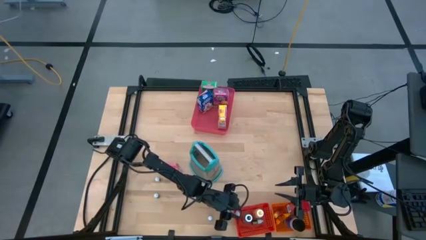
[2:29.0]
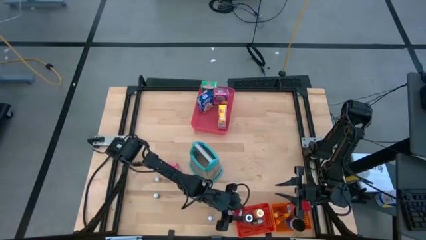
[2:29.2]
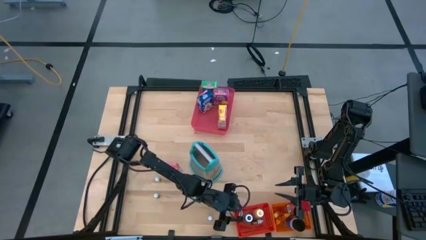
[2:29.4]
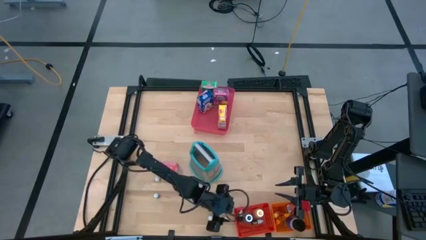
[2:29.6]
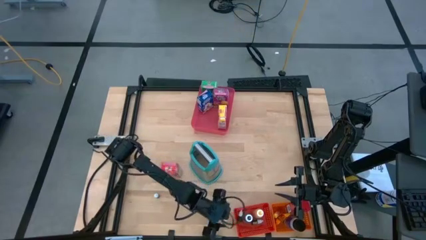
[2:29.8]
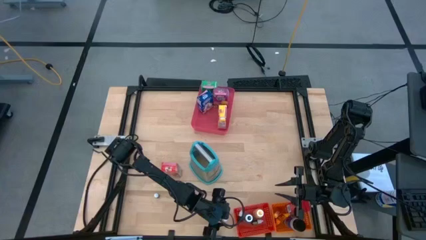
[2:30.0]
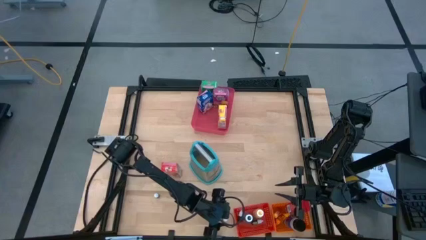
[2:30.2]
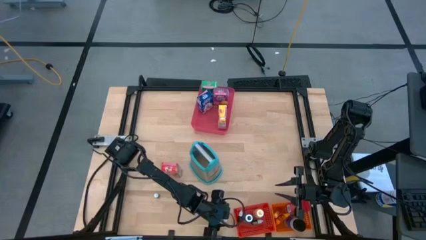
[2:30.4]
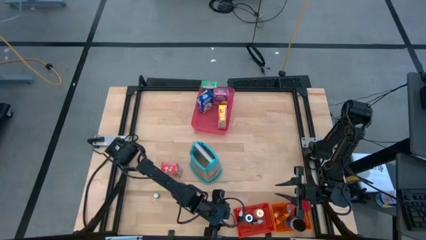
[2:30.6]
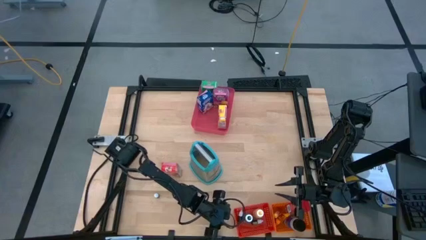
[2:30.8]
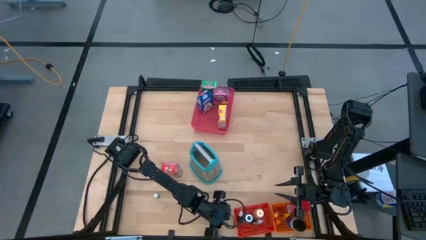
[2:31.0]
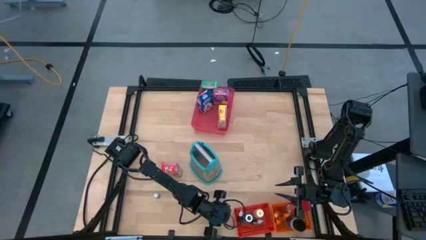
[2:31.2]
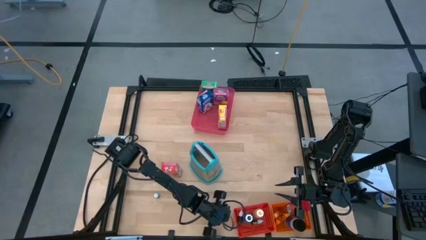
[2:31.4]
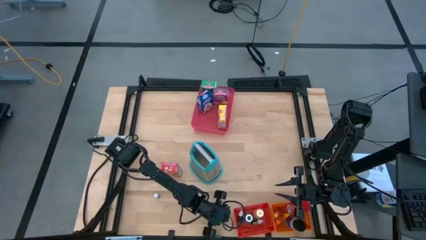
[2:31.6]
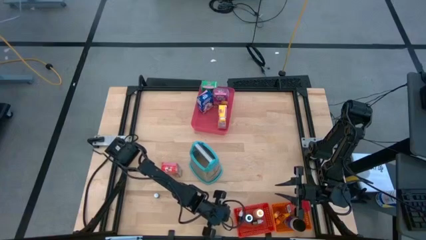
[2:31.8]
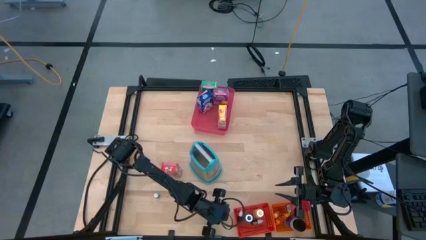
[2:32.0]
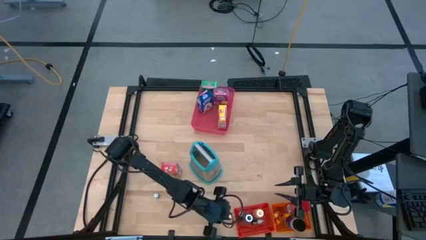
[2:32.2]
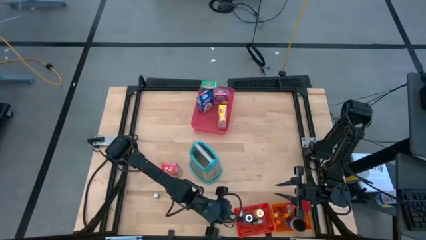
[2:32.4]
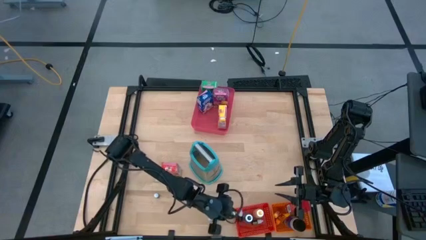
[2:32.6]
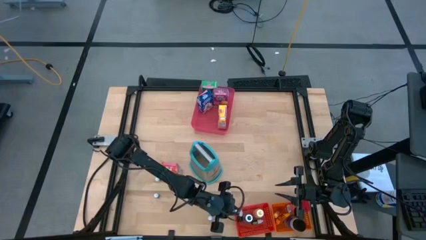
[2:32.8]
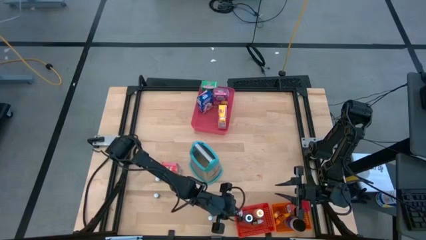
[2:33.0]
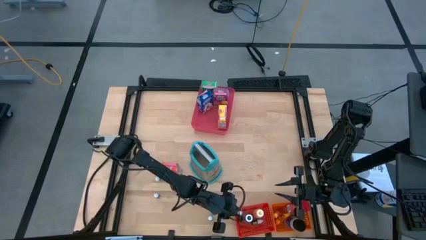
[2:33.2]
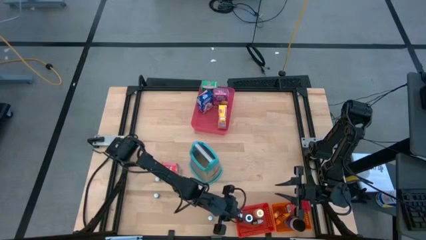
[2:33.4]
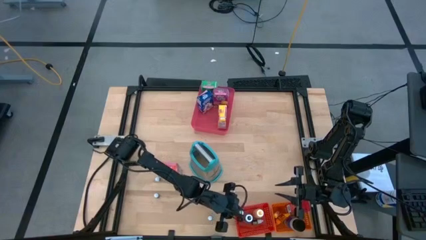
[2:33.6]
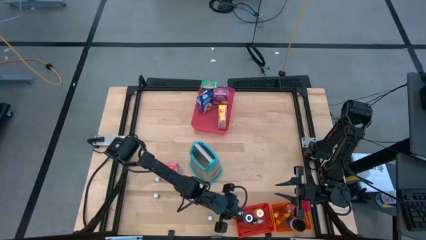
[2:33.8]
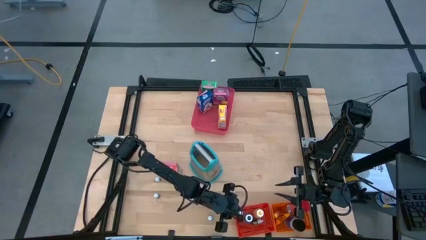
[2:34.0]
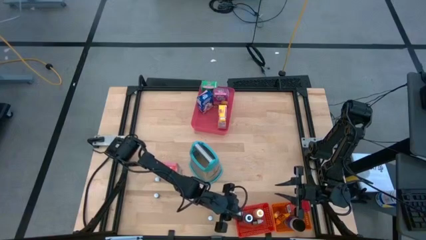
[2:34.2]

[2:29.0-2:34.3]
Task: Pick & Place Kitchen Items
Put the red food coloring bottle into the red bin

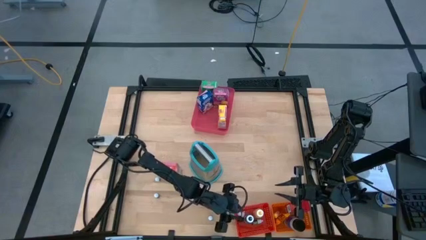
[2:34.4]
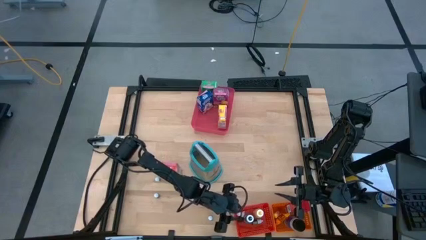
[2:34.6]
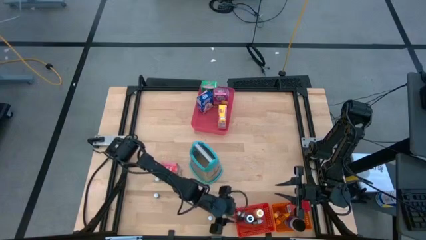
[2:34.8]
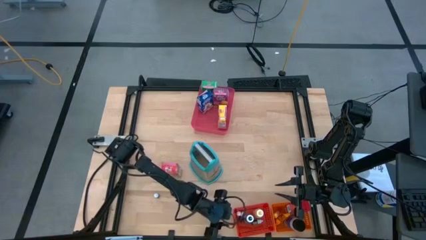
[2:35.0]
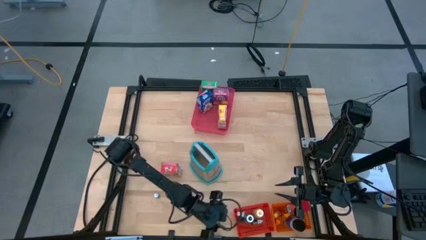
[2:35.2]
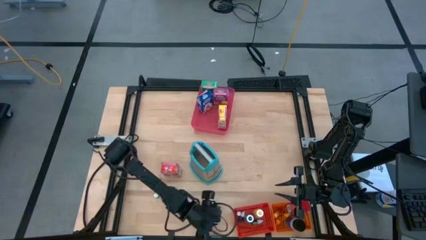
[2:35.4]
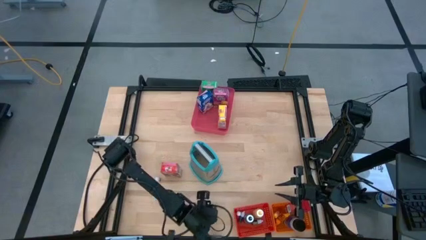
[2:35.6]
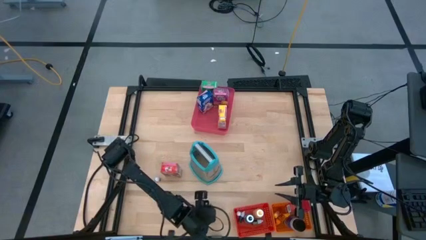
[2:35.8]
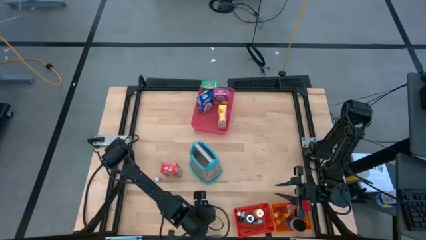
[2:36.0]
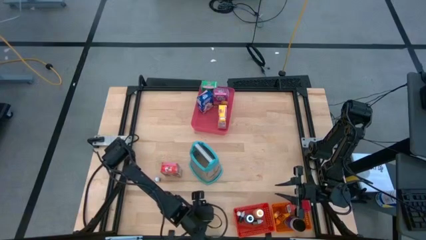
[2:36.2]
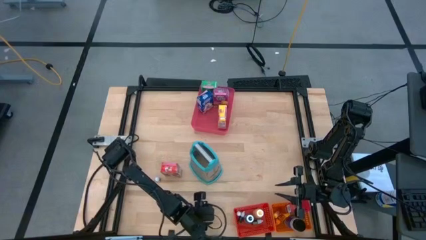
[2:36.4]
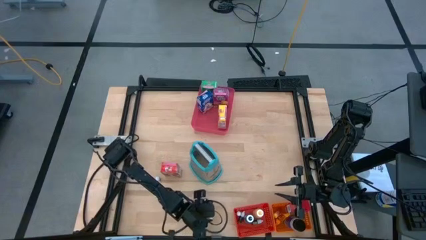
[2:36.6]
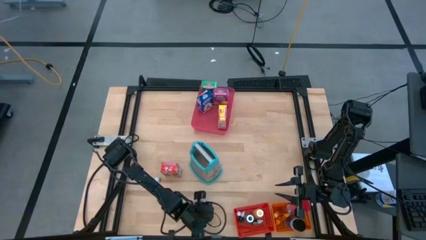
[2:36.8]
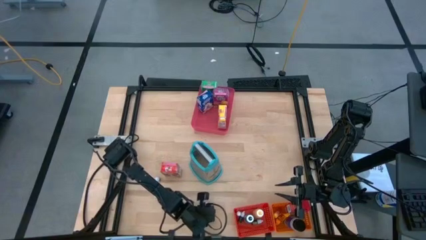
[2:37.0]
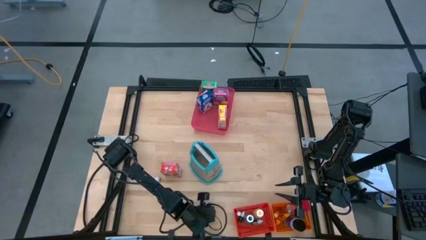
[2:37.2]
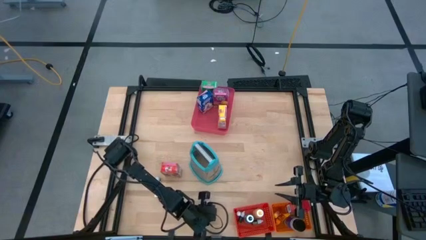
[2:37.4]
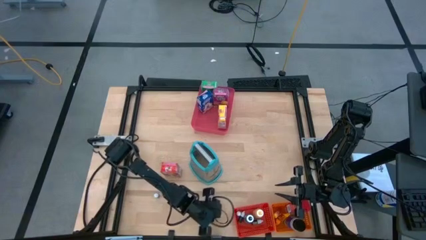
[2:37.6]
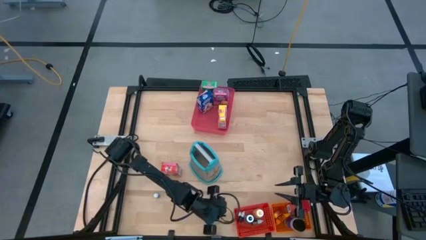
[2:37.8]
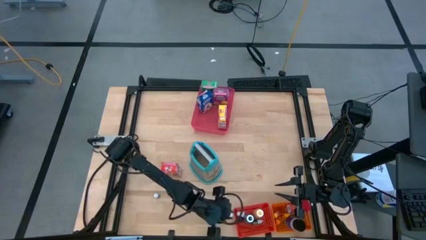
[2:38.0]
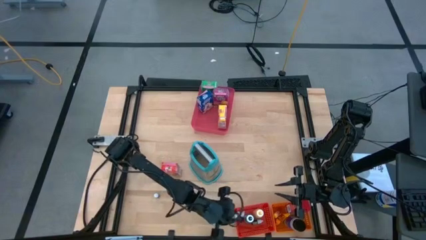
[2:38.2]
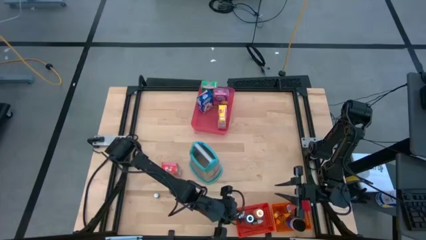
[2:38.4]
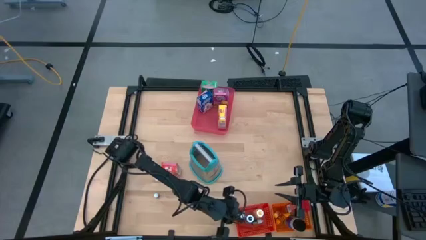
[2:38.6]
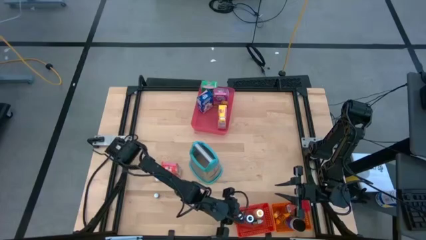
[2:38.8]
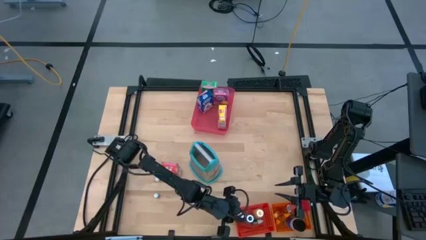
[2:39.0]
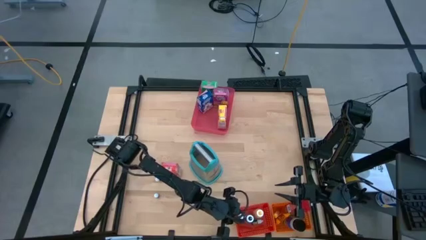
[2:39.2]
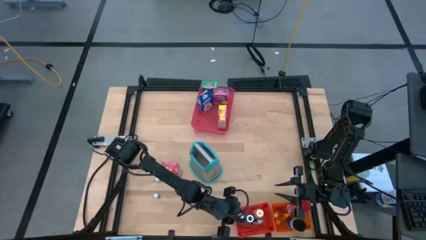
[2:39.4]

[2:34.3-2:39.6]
Put the violet food coloring bottle into the red bin

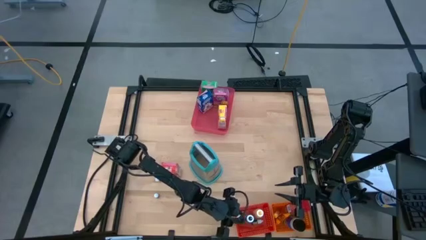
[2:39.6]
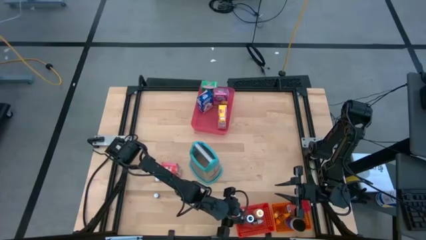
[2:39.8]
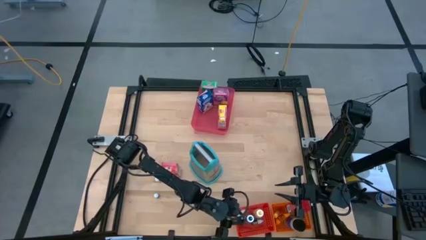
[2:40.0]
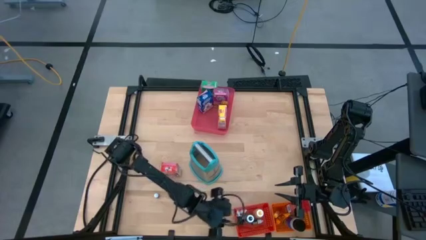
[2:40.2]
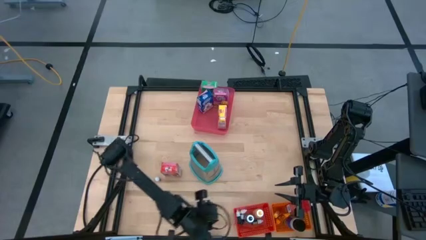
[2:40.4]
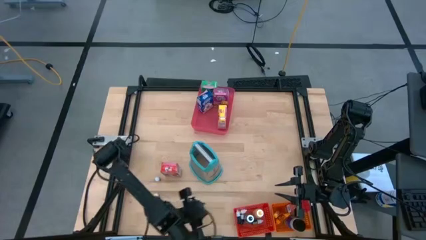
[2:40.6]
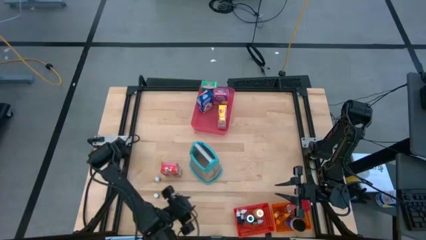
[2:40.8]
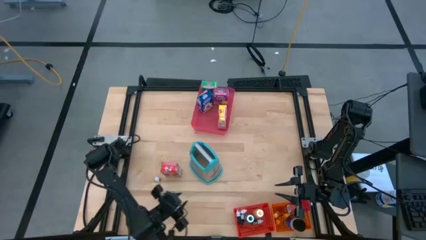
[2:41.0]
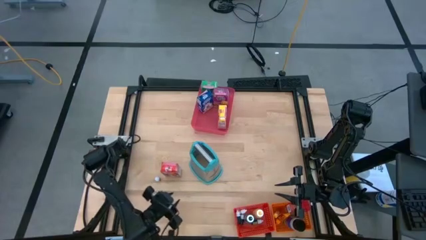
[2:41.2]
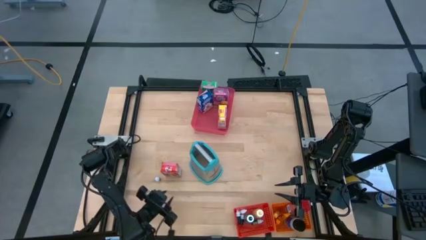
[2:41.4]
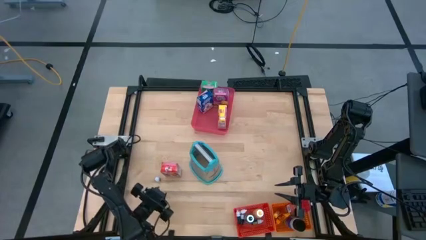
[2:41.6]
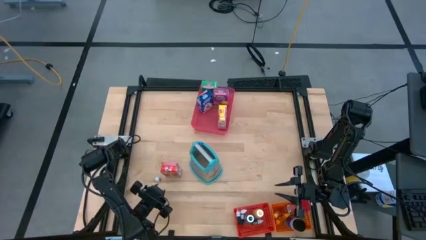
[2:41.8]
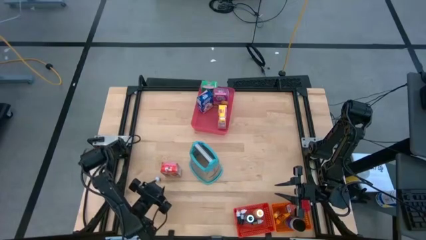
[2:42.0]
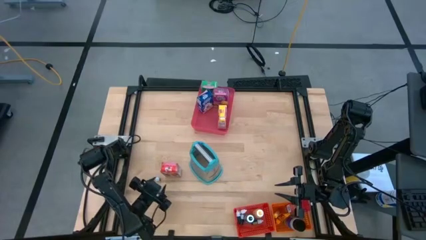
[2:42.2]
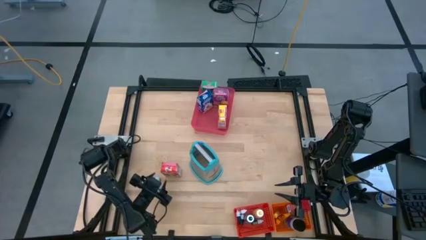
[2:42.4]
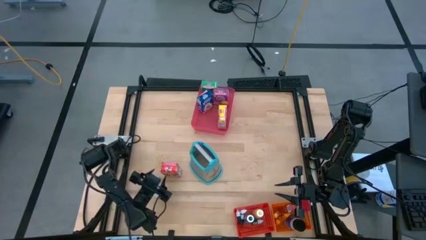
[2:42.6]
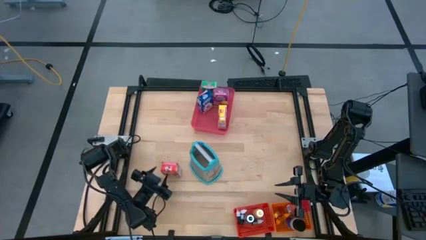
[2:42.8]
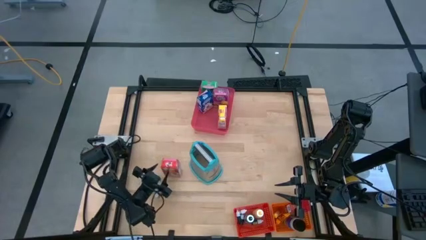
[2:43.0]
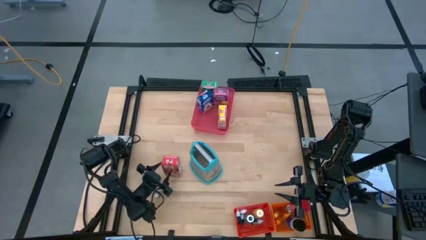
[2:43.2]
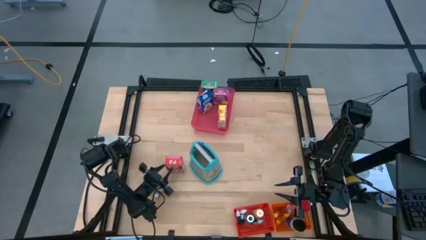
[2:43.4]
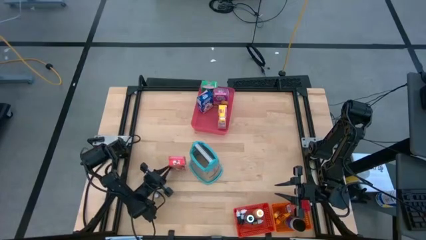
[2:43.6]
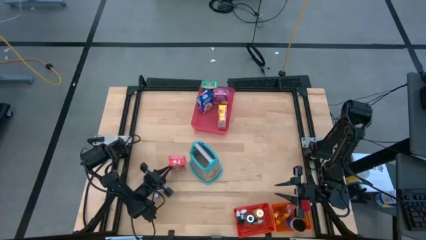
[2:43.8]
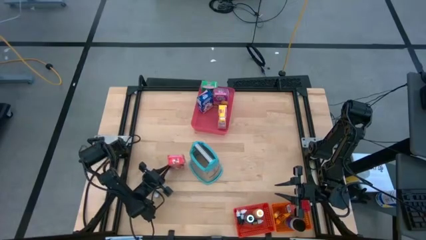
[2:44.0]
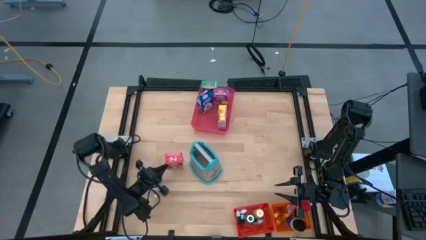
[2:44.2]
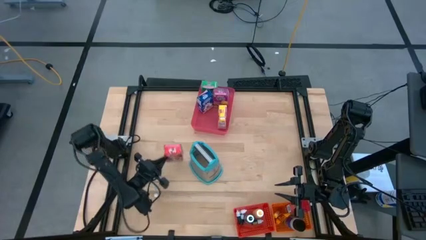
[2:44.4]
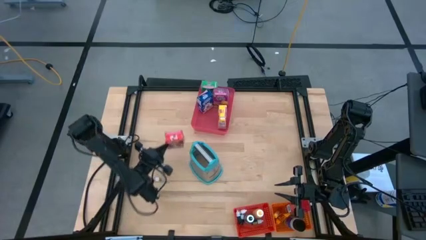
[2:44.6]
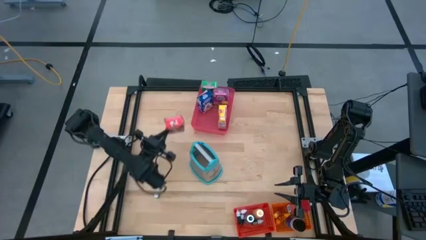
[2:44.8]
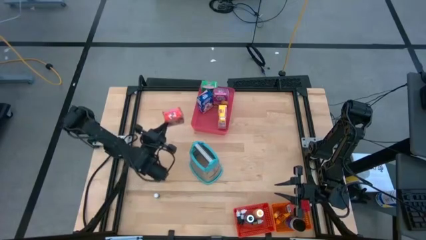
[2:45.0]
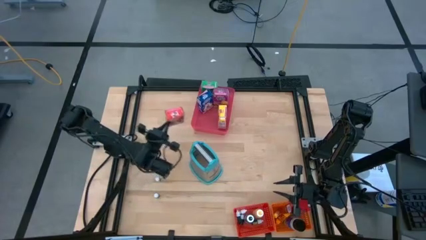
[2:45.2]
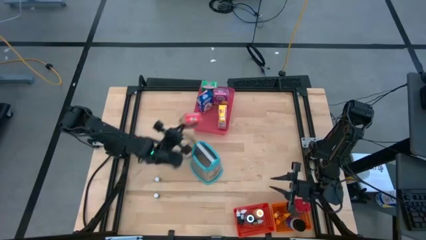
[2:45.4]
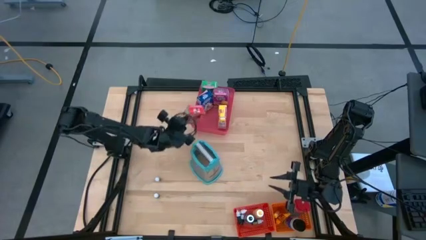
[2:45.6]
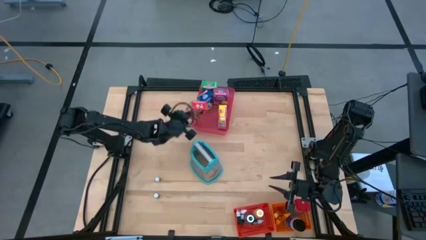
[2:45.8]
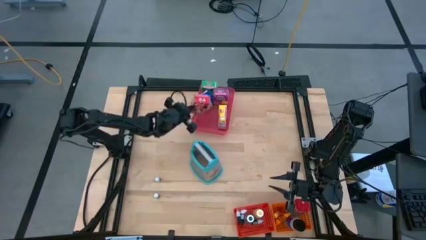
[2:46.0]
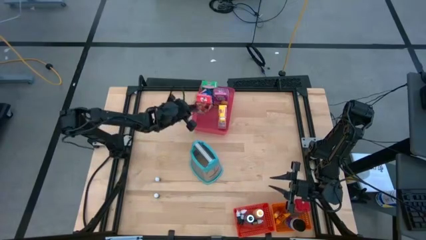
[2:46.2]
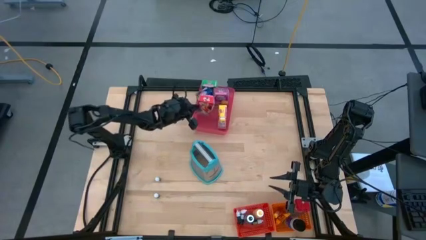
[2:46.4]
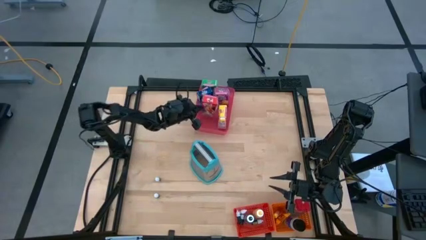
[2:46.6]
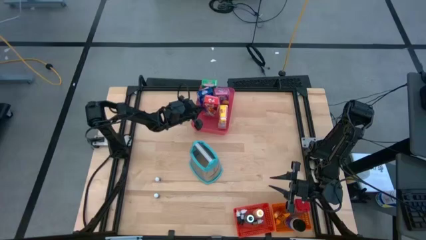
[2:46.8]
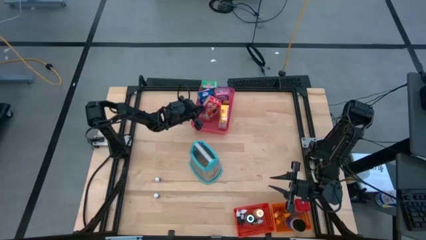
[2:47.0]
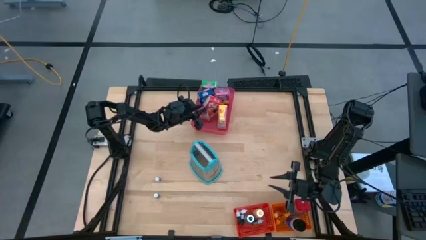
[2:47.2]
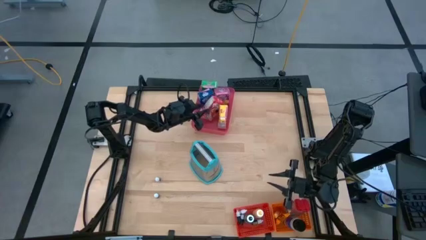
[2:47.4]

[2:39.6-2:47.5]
Put the red cereal box into the pink bin
